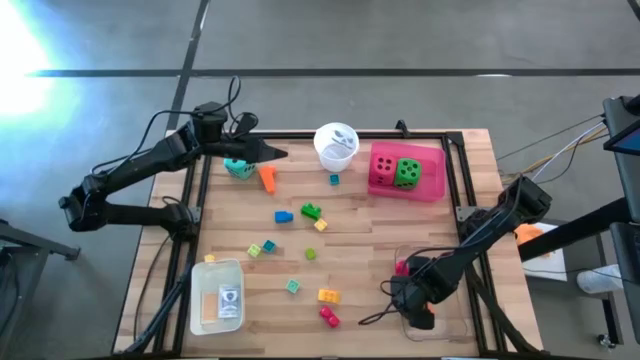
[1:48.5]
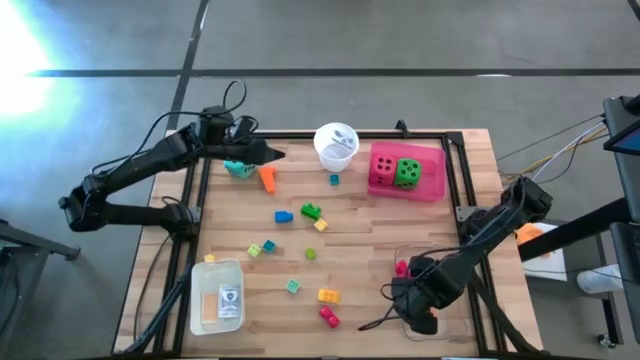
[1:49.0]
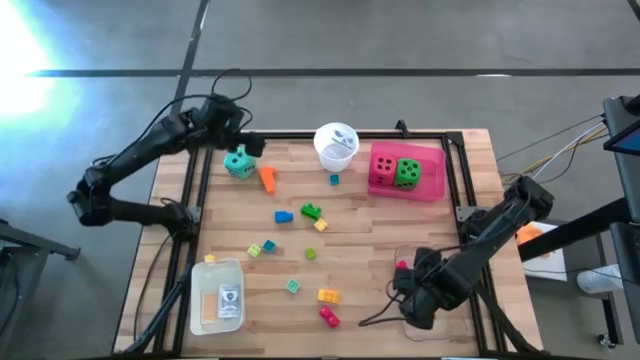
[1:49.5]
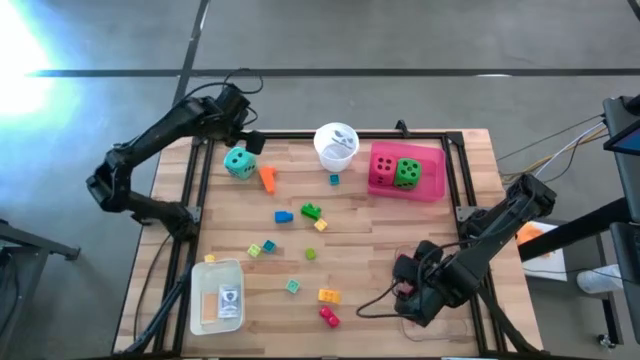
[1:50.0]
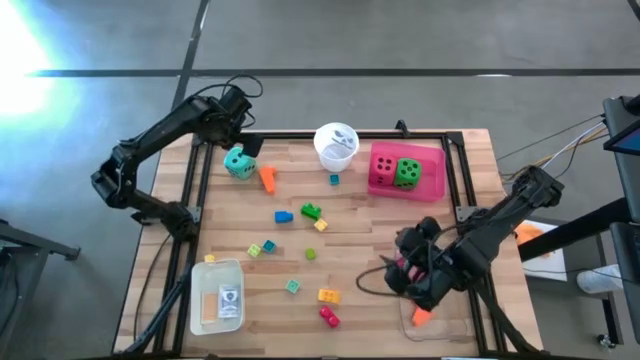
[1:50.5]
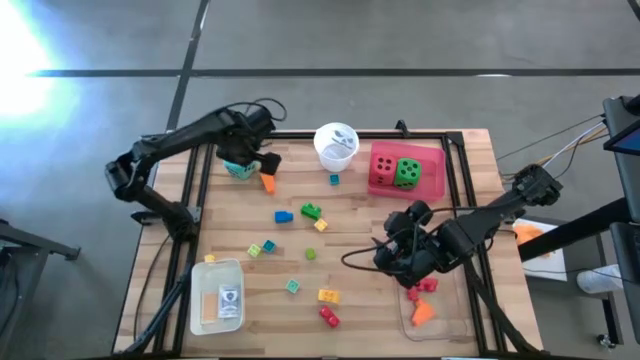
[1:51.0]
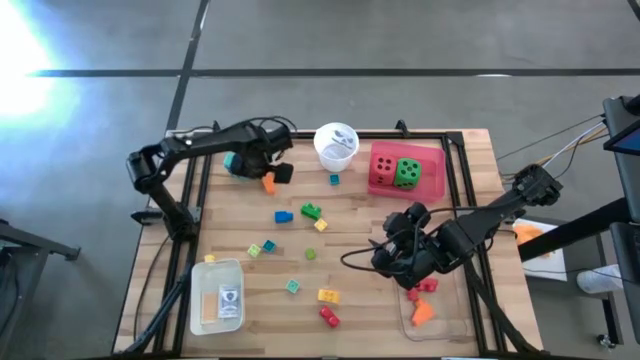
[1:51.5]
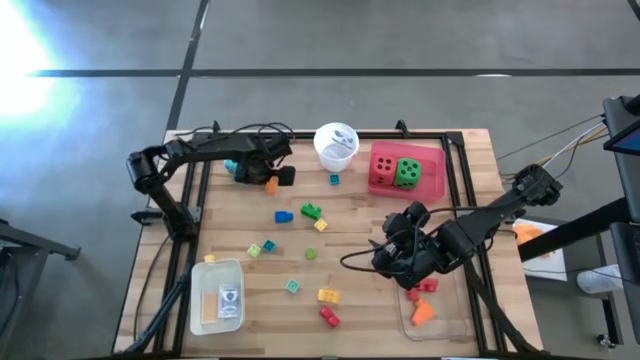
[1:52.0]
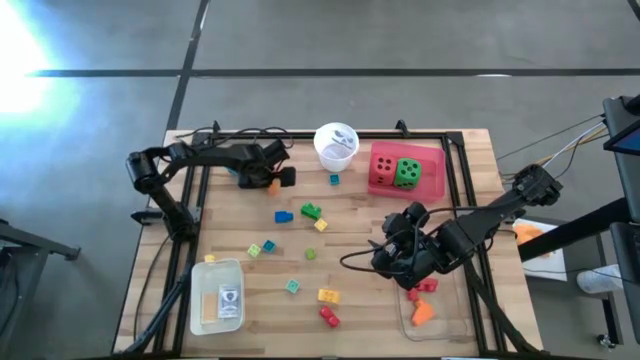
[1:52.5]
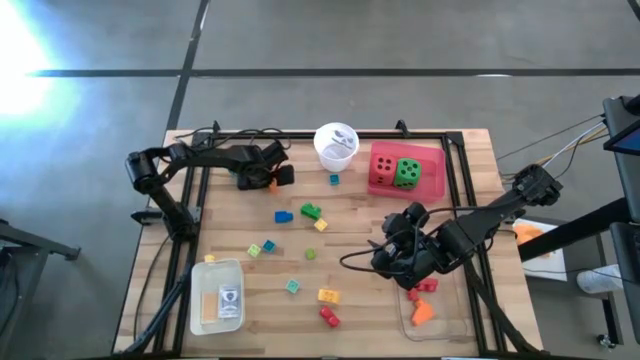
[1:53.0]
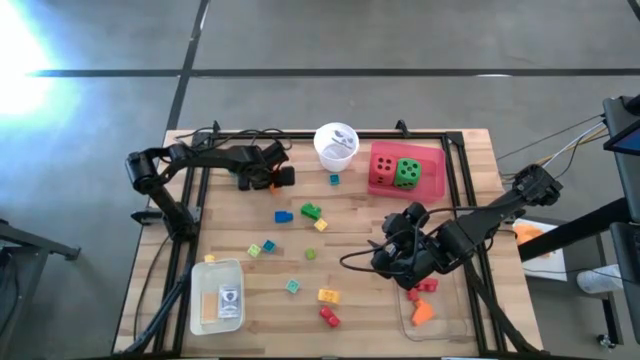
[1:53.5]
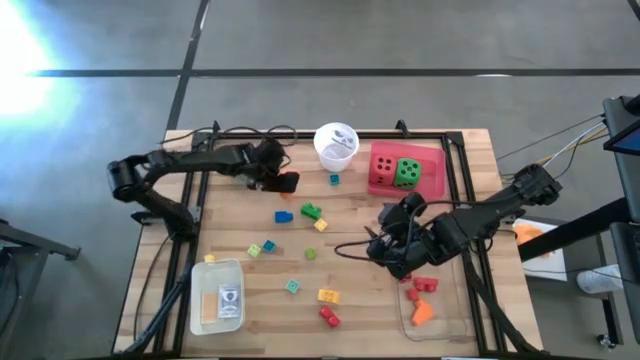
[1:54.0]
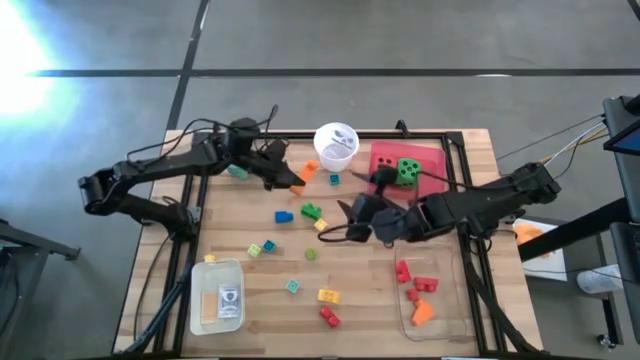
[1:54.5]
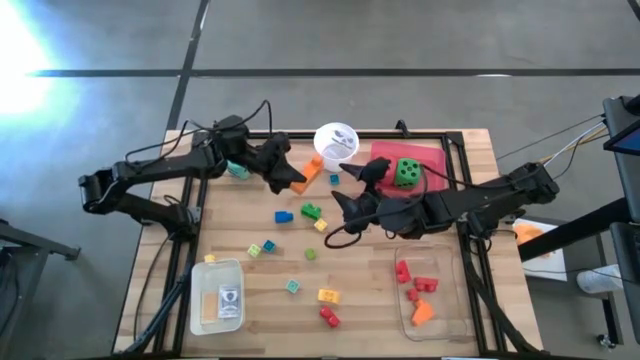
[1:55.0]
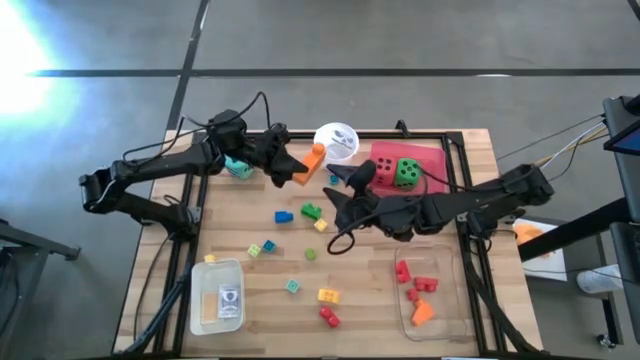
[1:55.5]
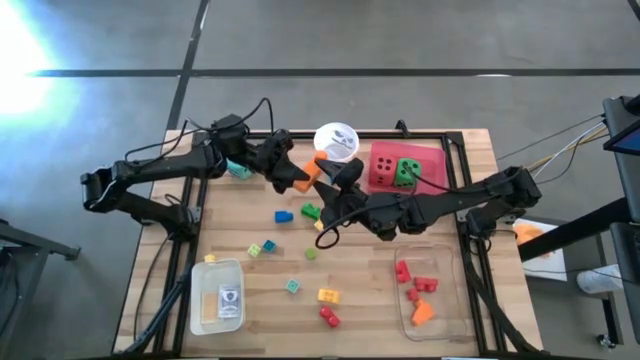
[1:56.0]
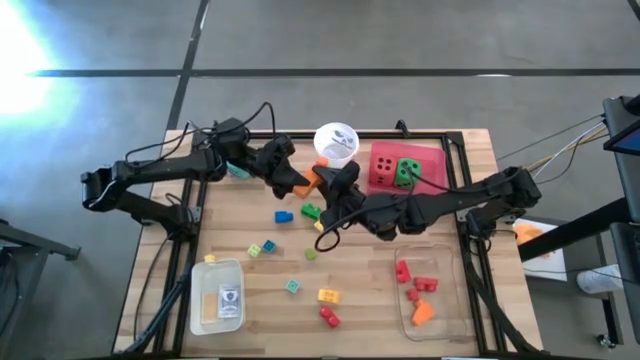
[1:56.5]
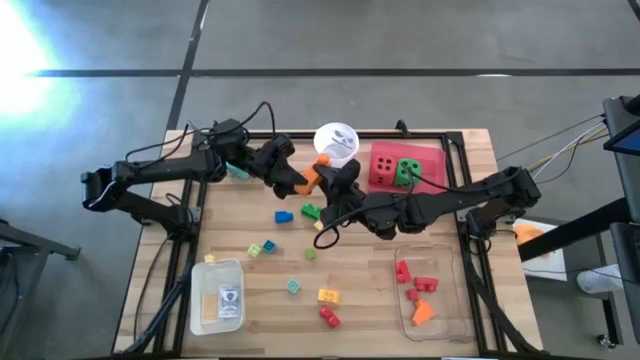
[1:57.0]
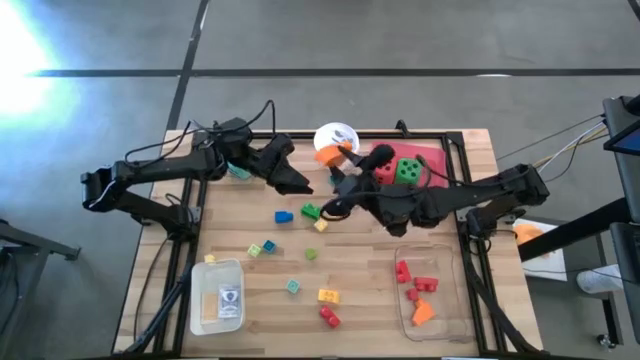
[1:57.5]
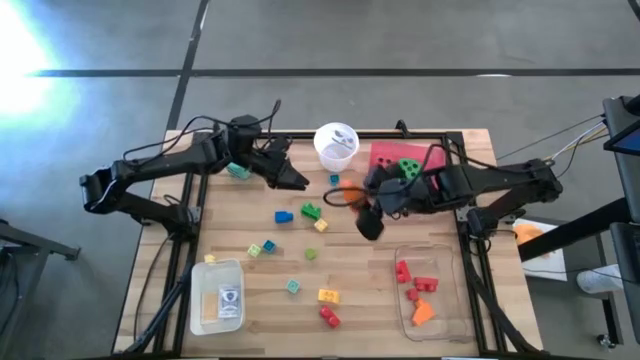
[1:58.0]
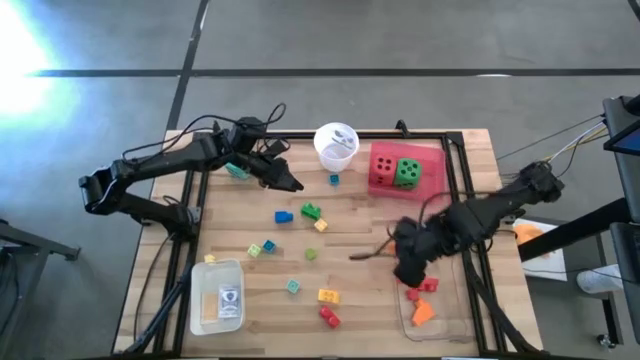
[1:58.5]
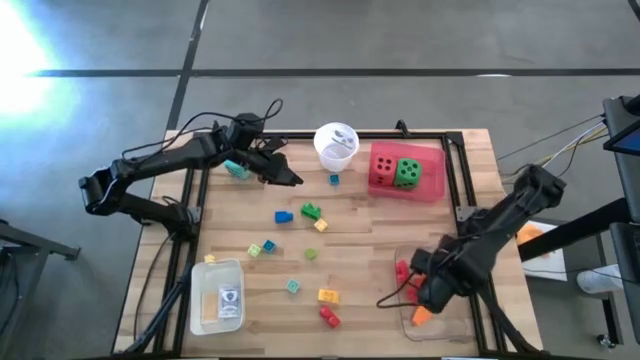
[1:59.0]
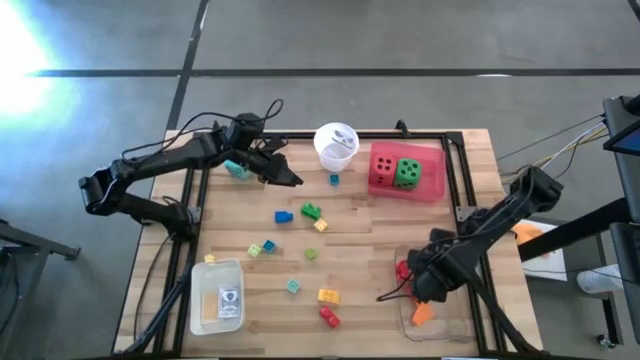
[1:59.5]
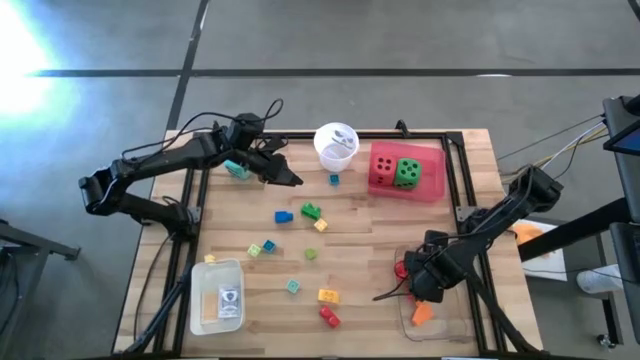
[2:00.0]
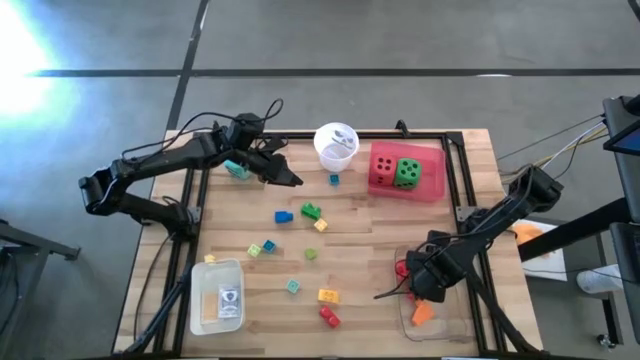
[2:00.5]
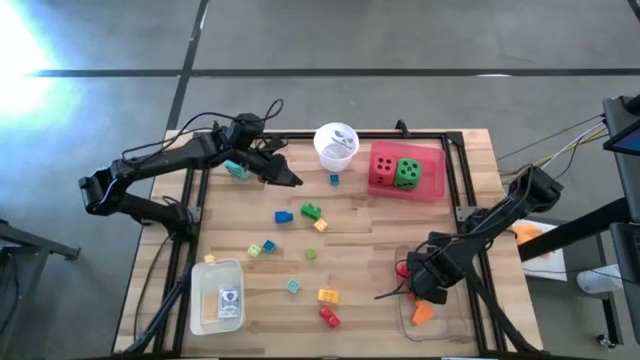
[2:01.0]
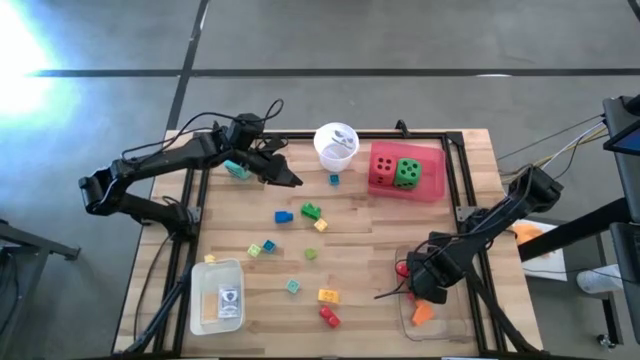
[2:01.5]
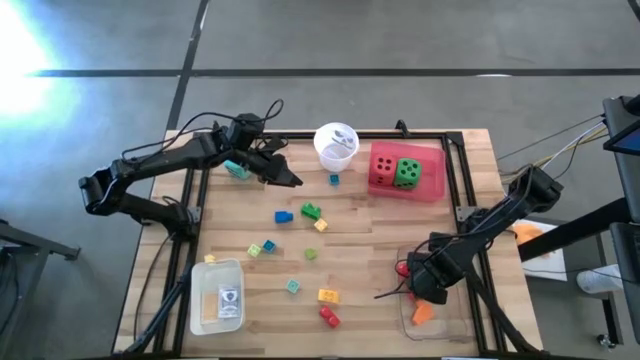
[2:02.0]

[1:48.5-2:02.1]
Task: Pick & Place Toys
Put the orange game piece into the transparent bin

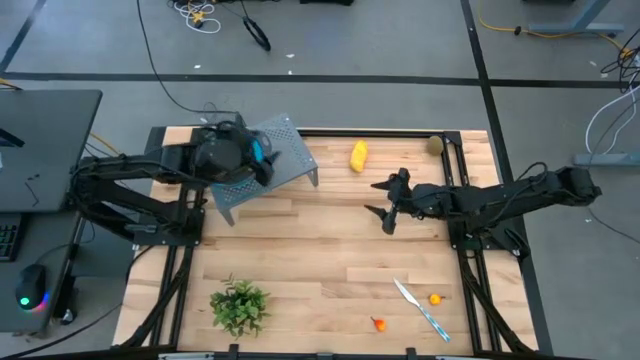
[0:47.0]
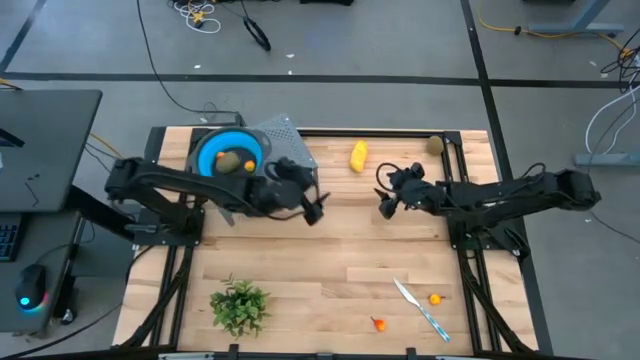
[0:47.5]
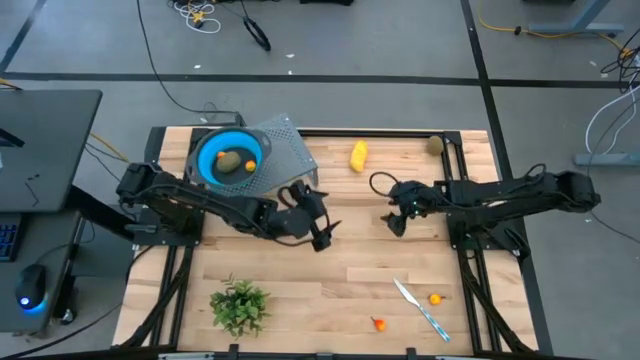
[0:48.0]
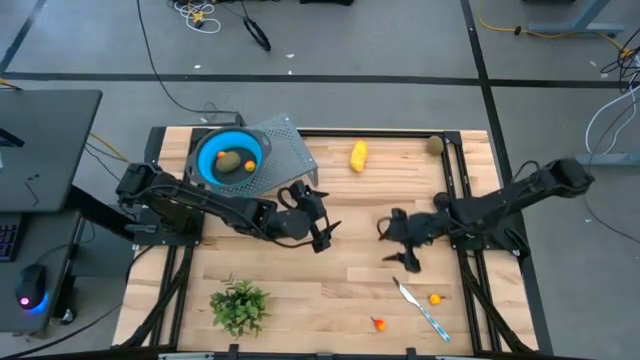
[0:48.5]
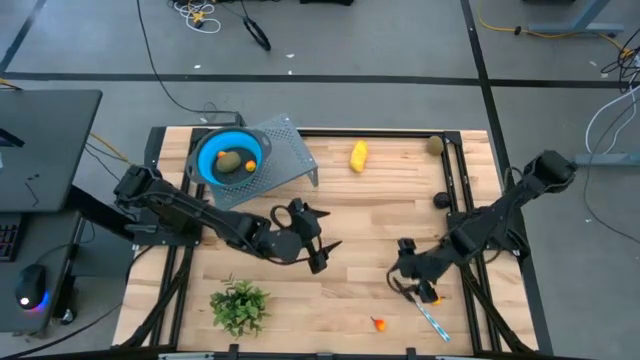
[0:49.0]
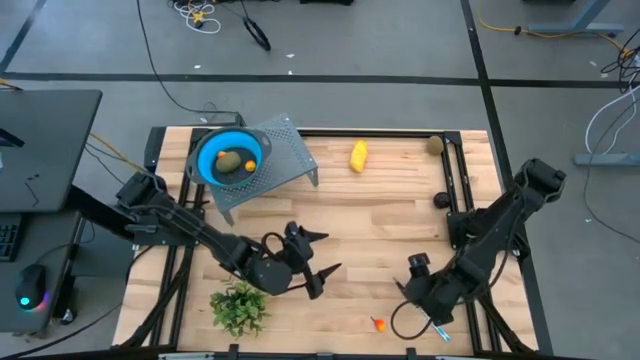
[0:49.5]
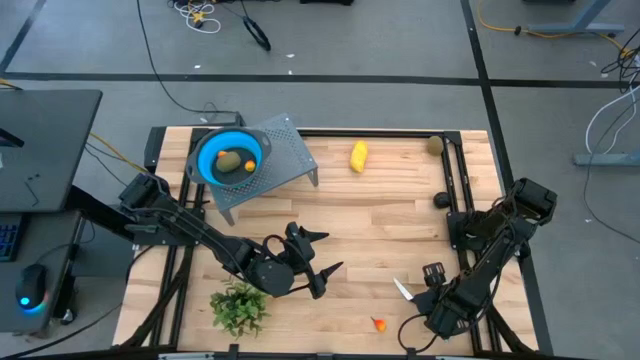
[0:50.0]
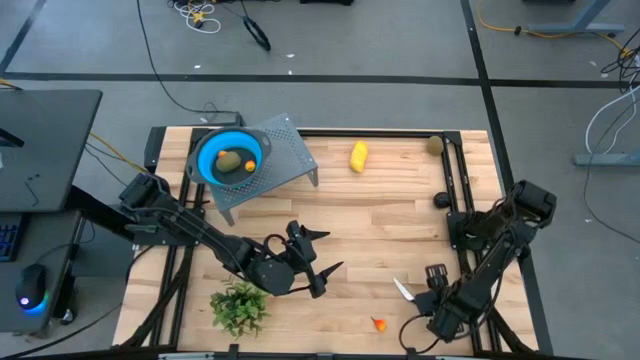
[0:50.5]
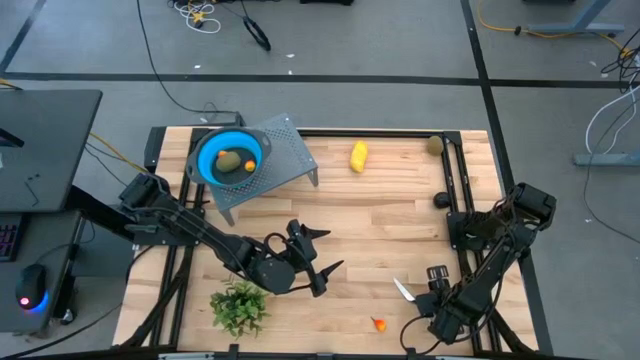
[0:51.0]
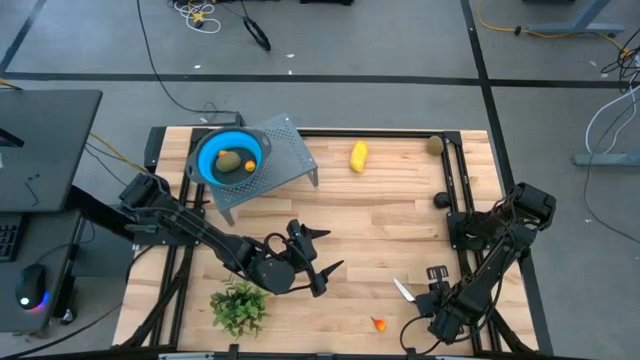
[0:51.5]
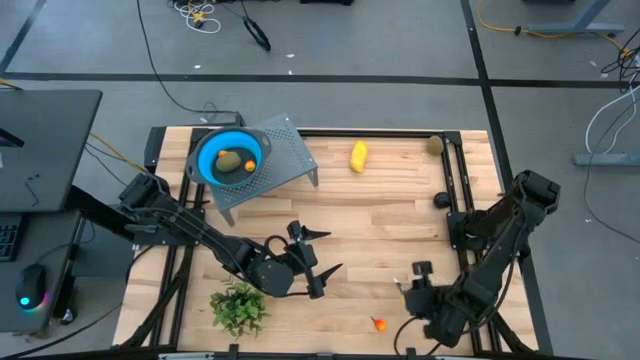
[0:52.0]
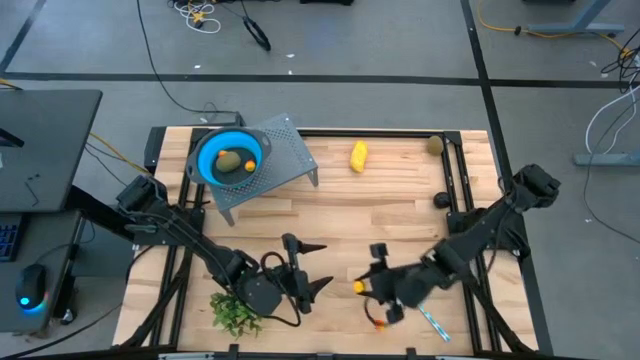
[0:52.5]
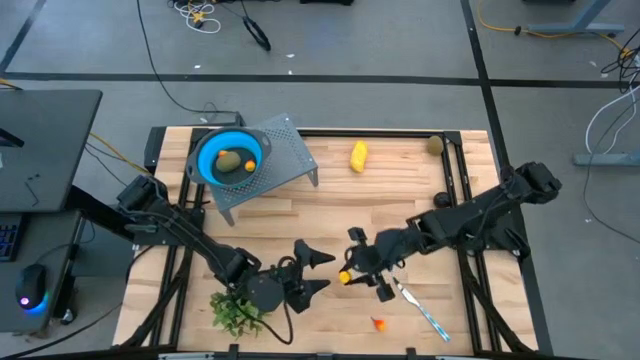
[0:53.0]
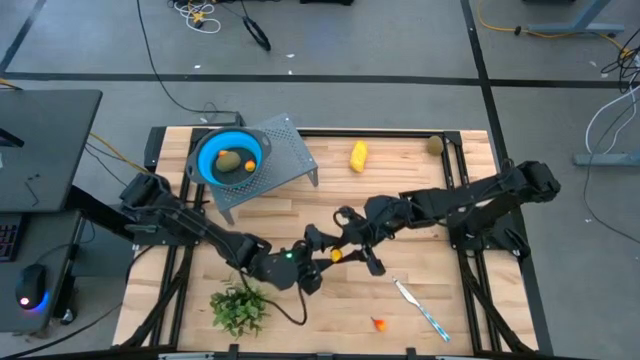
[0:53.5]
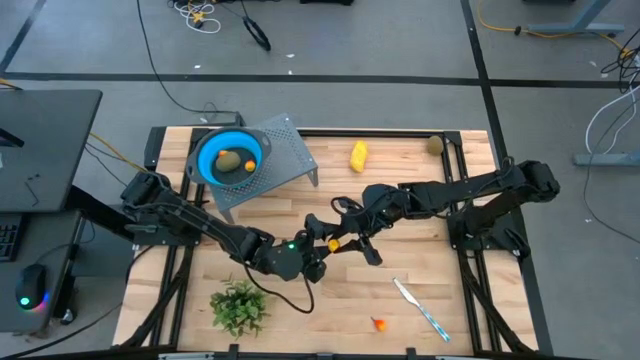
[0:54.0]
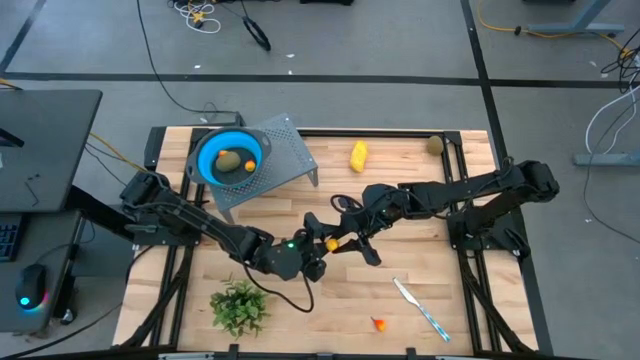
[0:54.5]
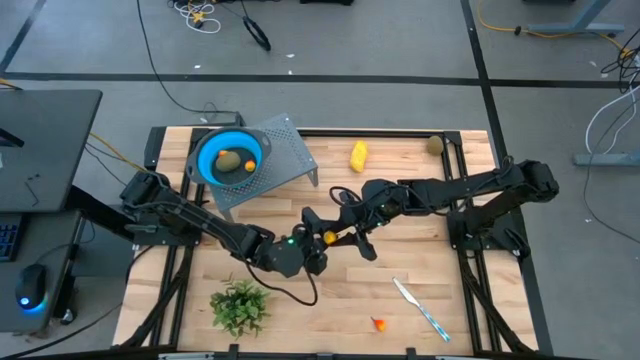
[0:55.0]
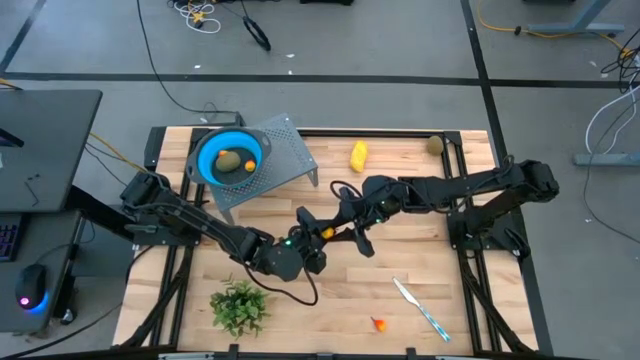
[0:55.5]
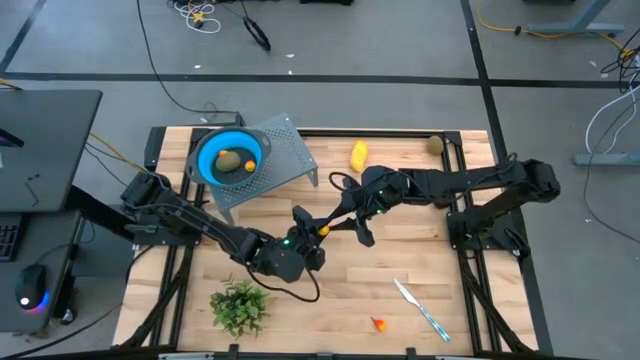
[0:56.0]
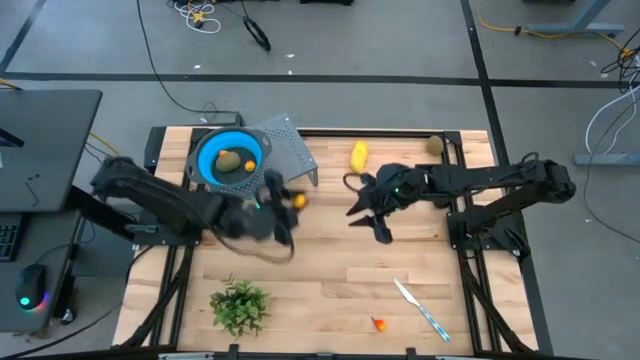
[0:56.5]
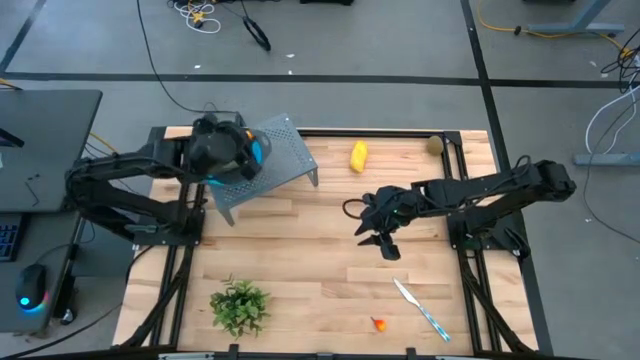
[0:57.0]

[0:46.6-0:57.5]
Task: Pick & Place Fruit
Put the yellow pear into the blue strainer bowl on the shelf
